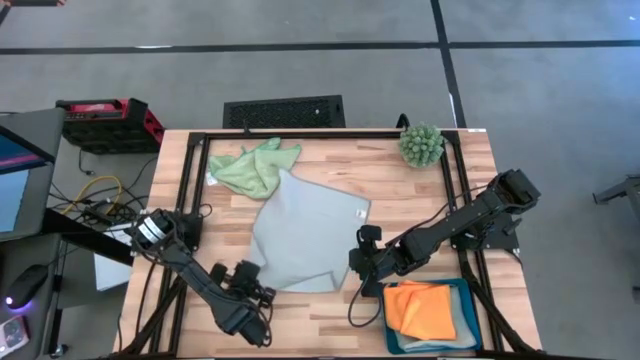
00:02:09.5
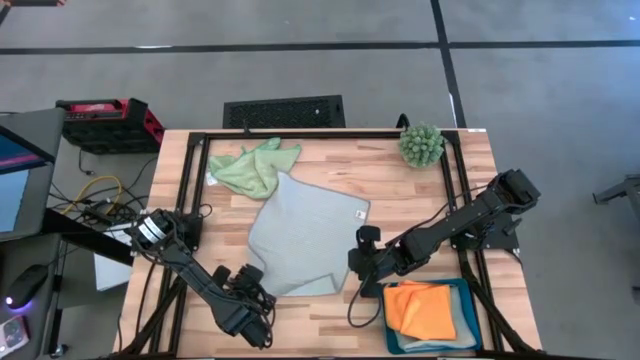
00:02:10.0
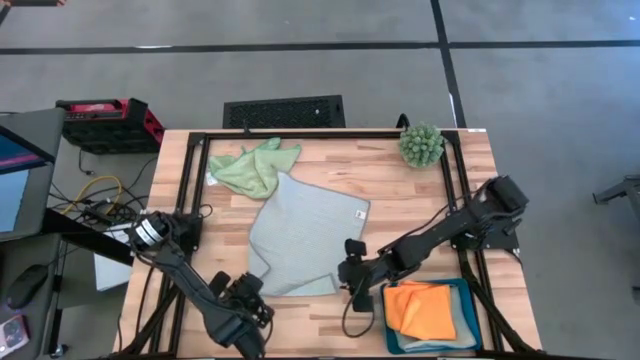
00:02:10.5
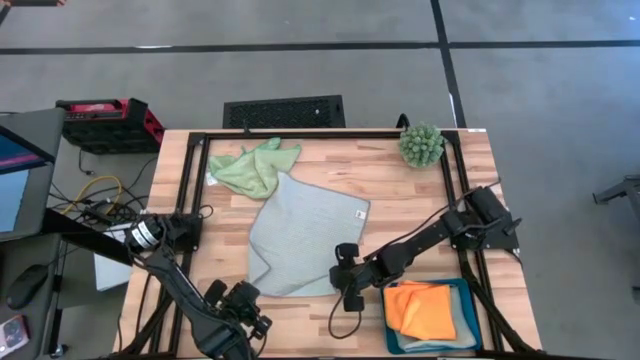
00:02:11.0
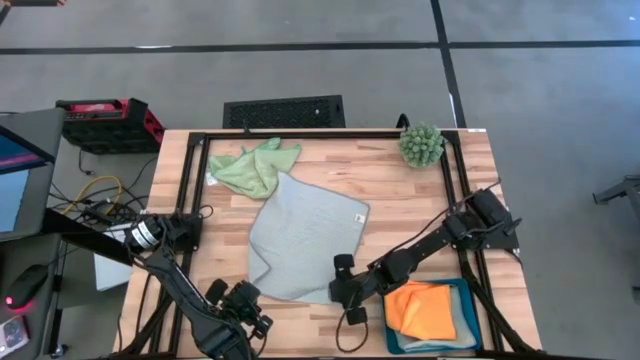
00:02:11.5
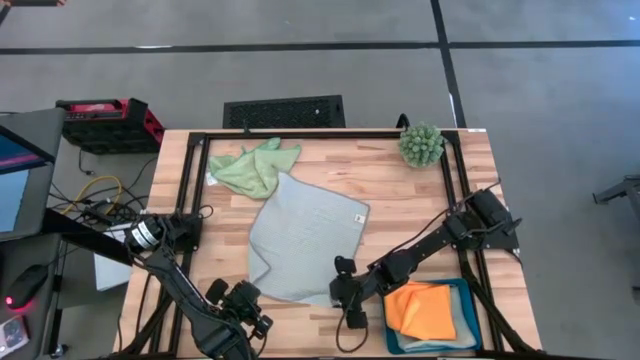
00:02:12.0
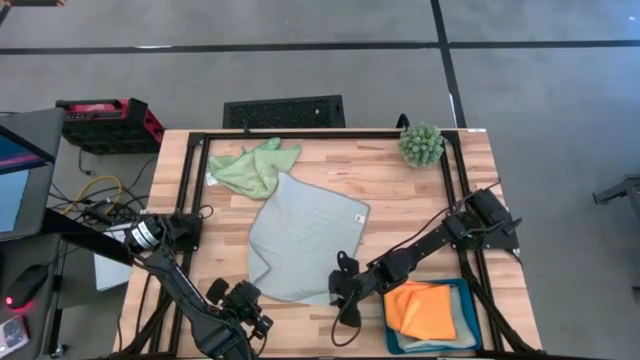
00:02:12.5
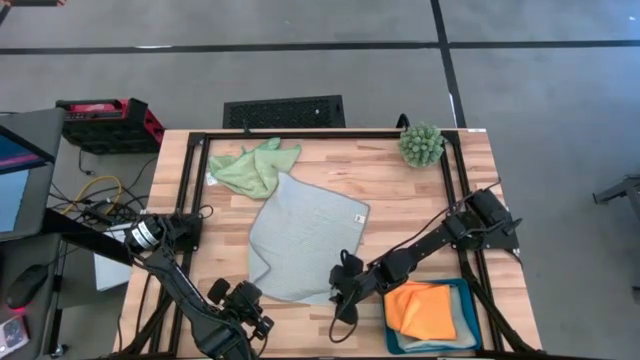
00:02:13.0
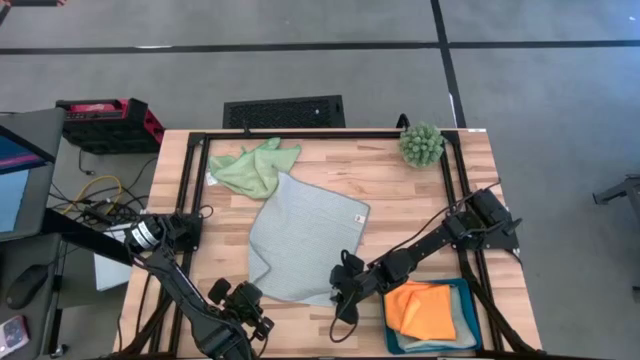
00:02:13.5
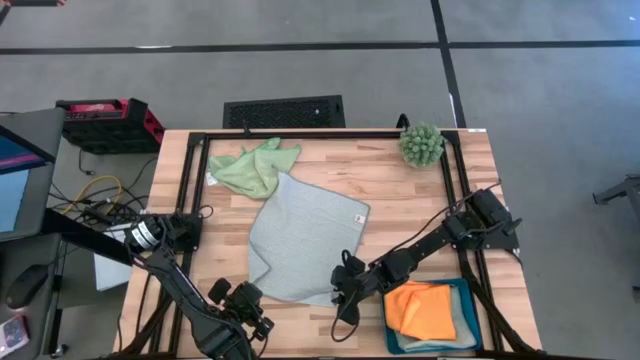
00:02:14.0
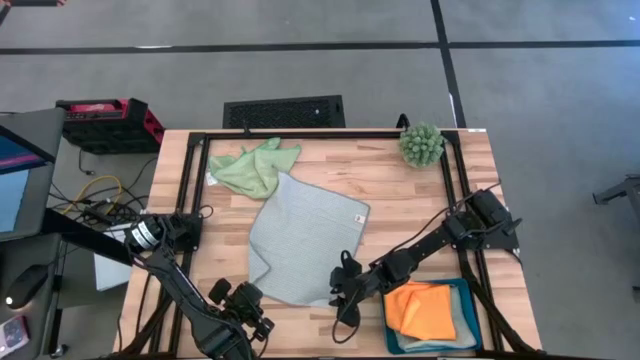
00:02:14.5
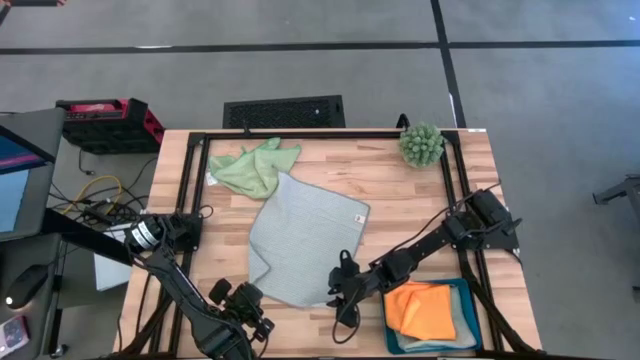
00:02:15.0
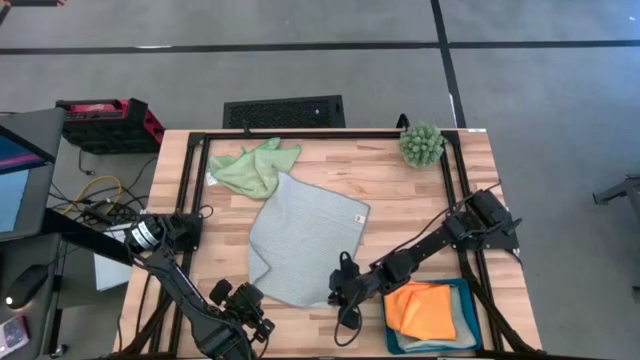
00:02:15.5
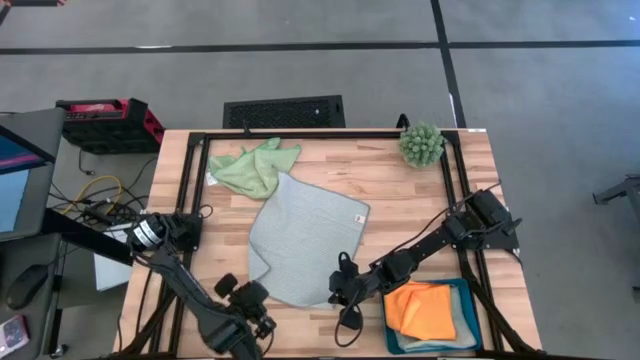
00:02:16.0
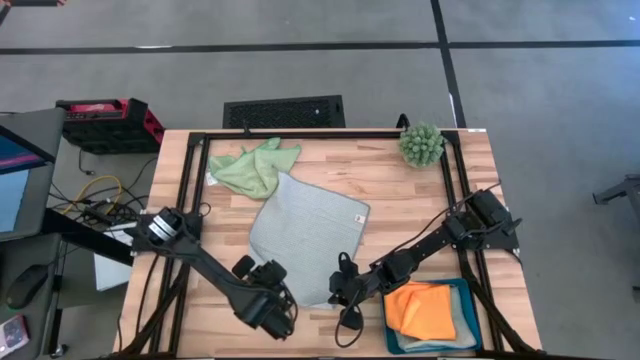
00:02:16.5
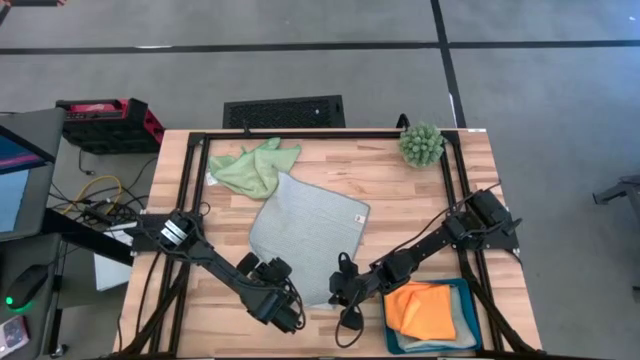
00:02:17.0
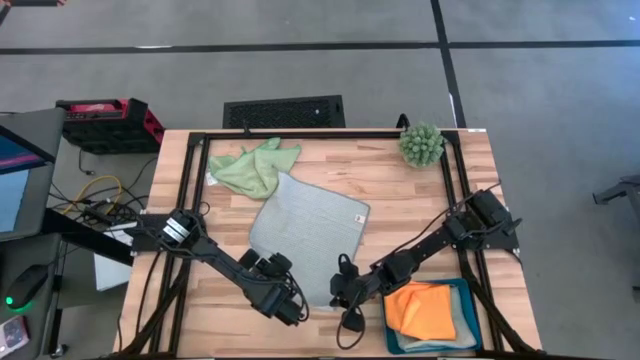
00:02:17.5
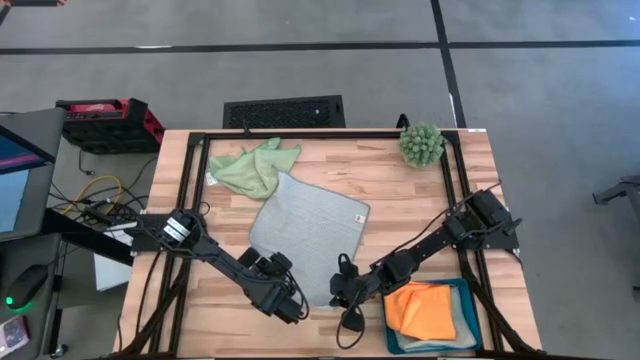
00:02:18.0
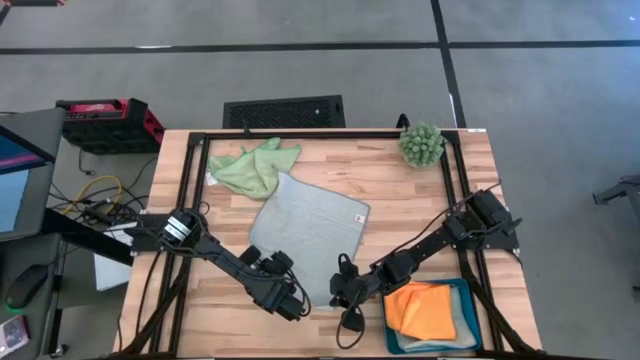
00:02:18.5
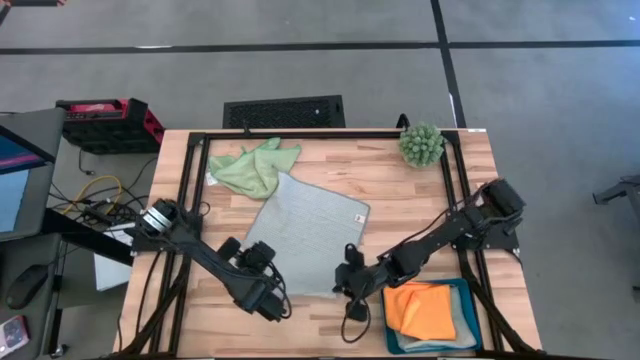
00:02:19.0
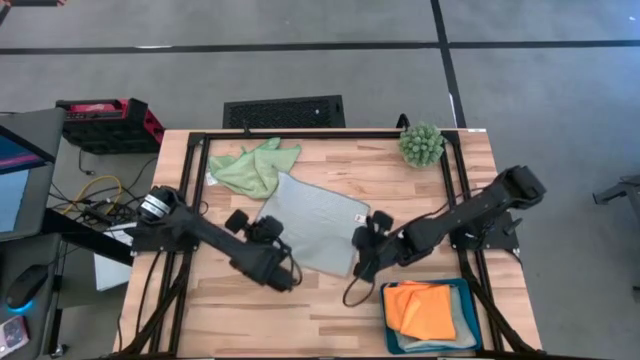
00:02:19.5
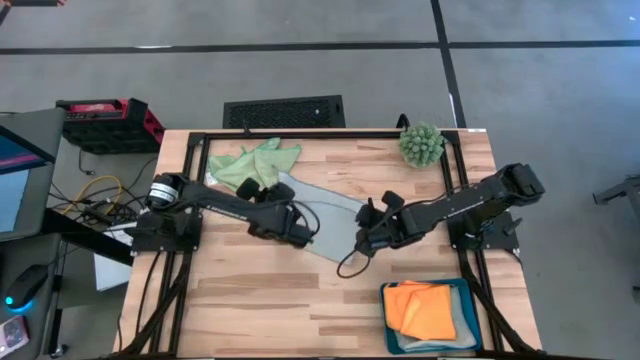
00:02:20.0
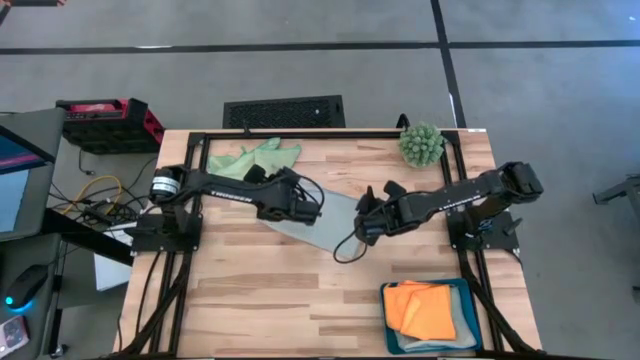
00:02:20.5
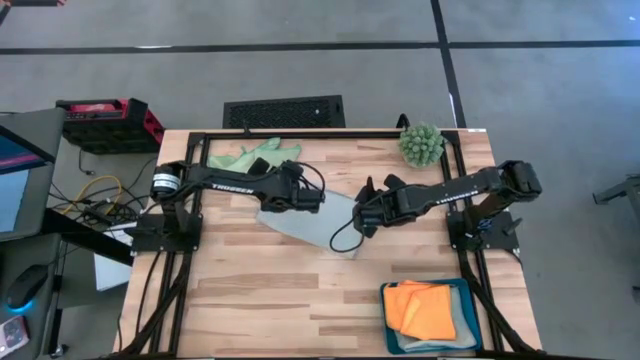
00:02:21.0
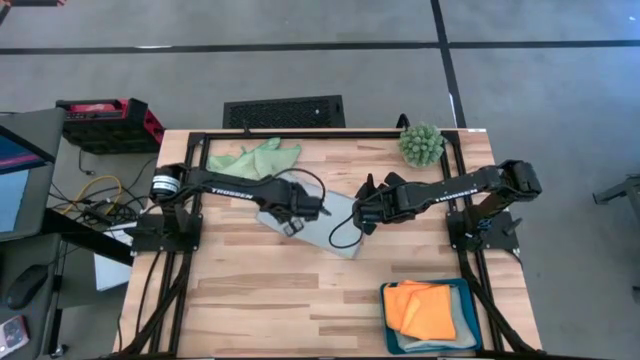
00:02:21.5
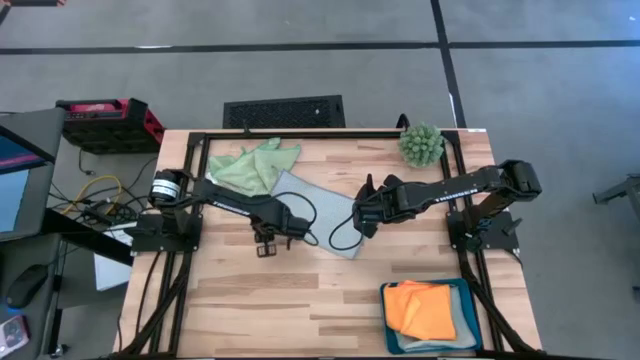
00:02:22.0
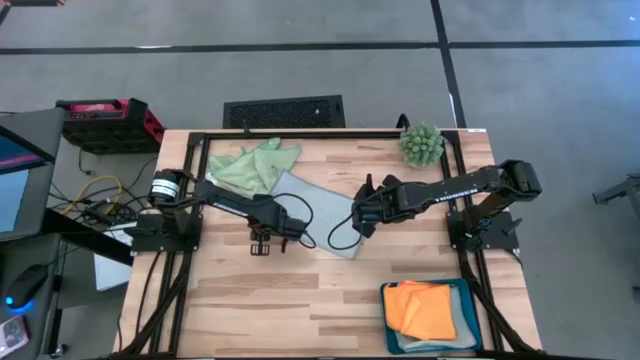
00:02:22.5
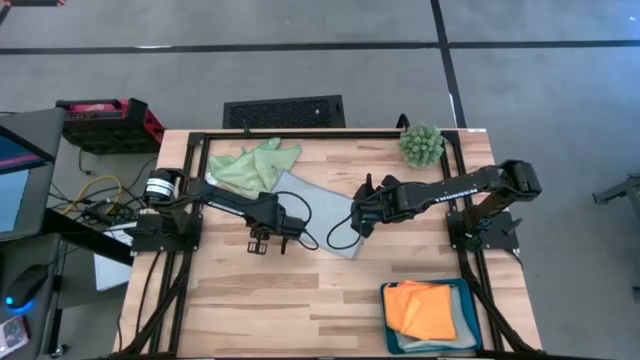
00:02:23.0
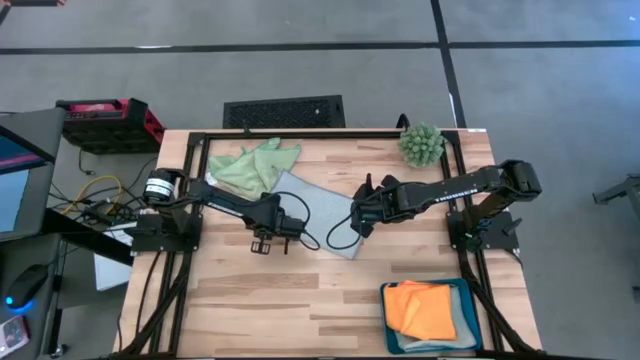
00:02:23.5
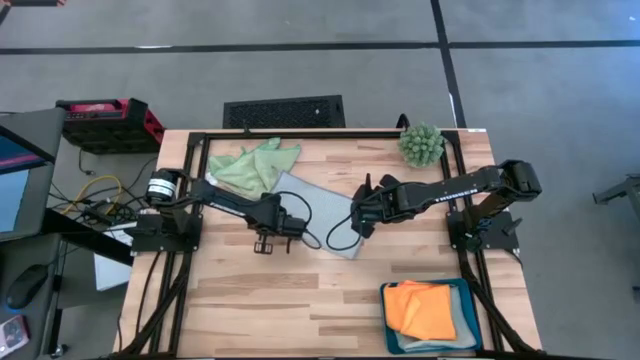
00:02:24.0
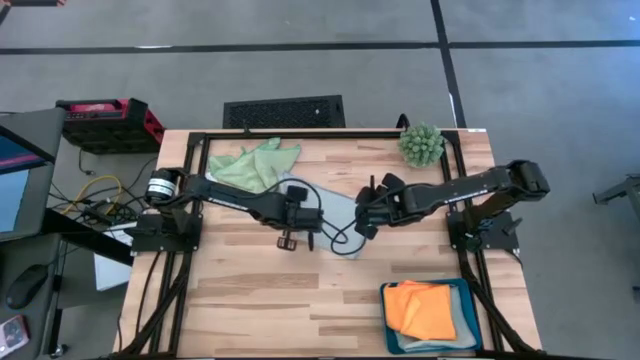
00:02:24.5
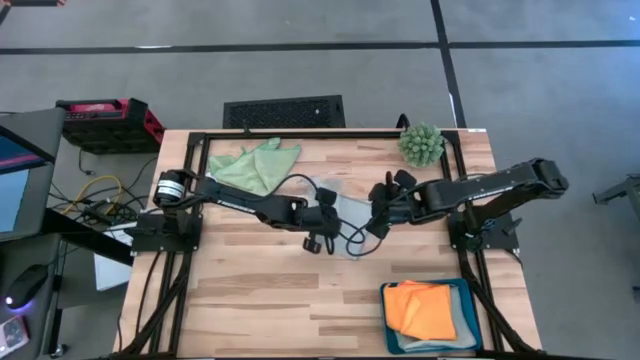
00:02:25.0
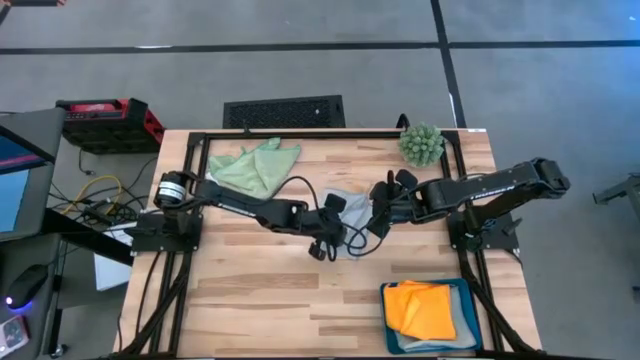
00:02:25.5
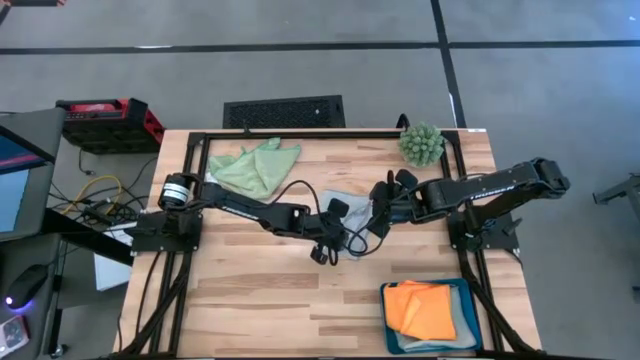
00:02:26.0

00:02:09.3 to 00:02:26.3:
Task: Fold microfiber towels
Fold the gray towel

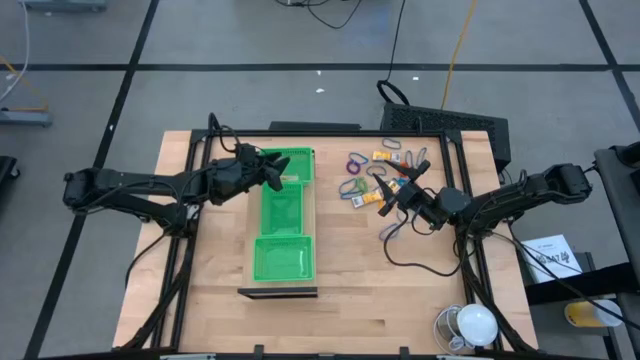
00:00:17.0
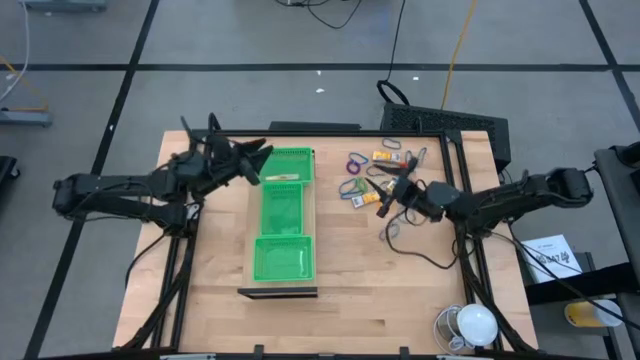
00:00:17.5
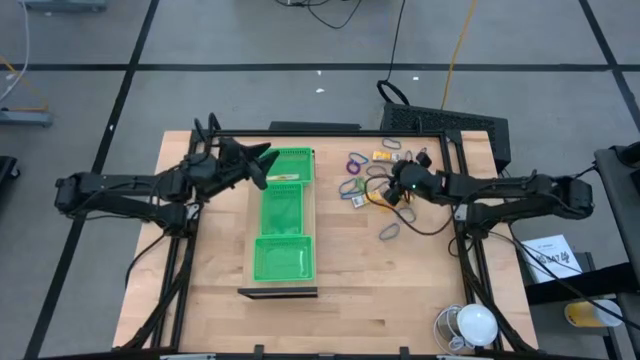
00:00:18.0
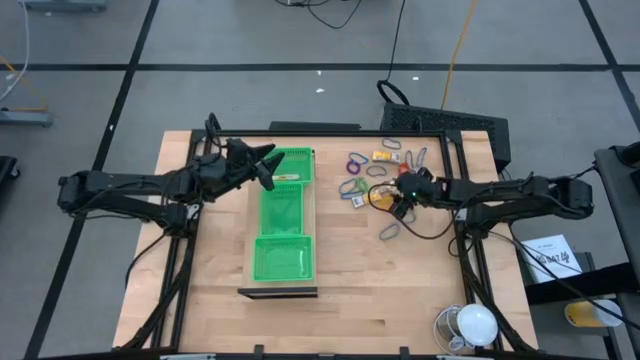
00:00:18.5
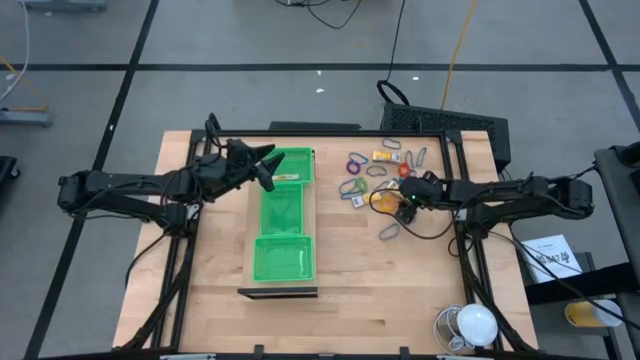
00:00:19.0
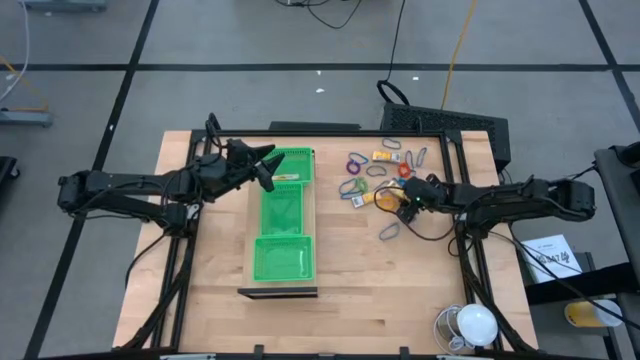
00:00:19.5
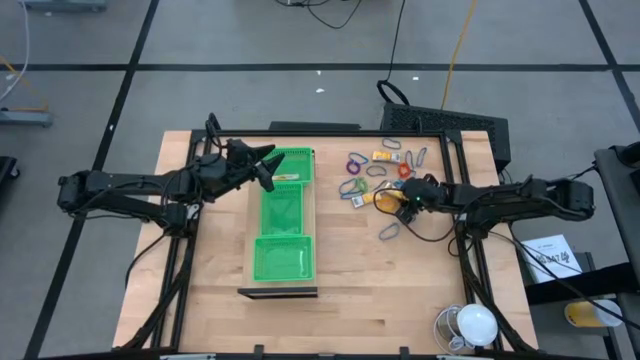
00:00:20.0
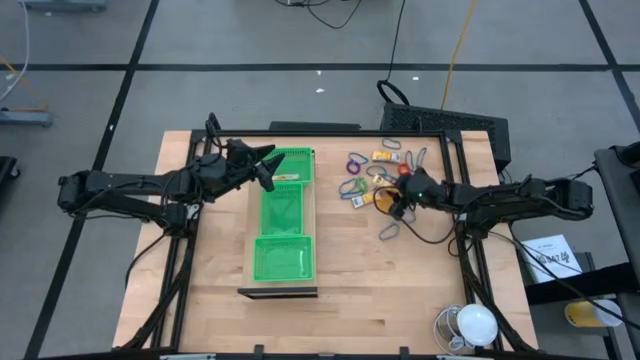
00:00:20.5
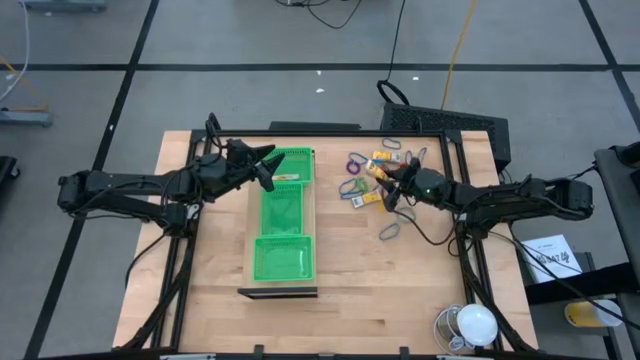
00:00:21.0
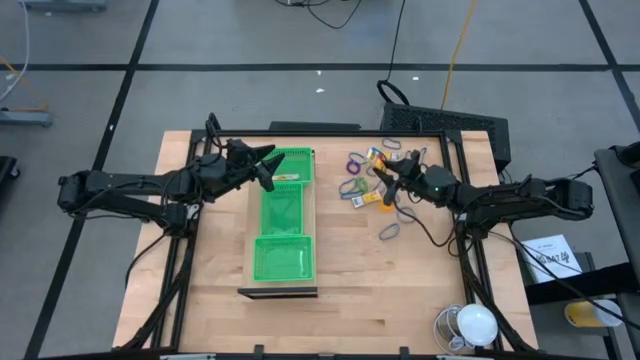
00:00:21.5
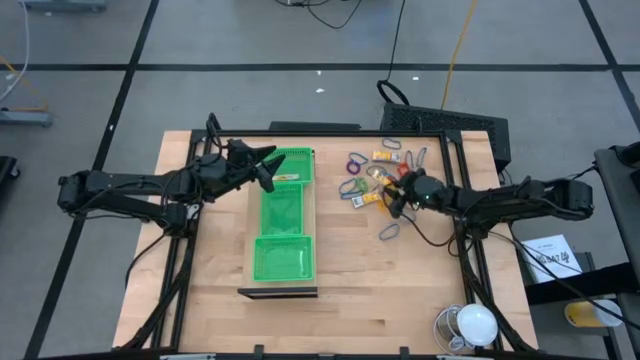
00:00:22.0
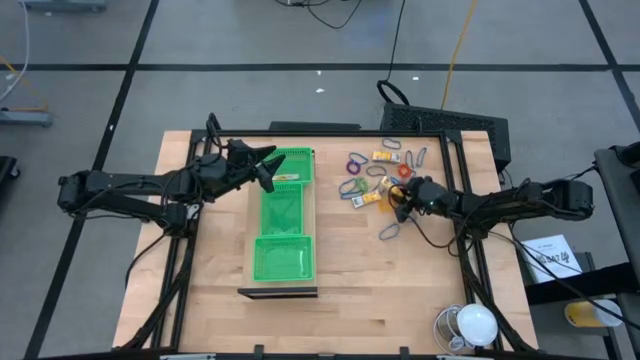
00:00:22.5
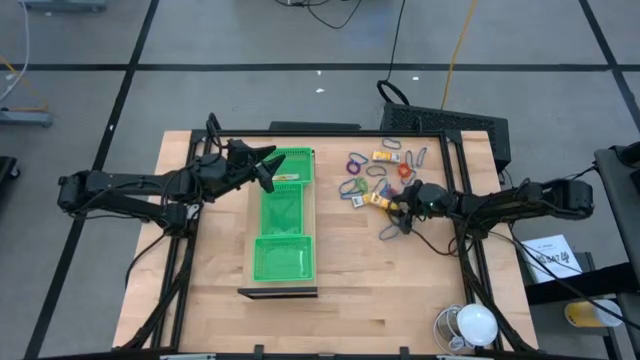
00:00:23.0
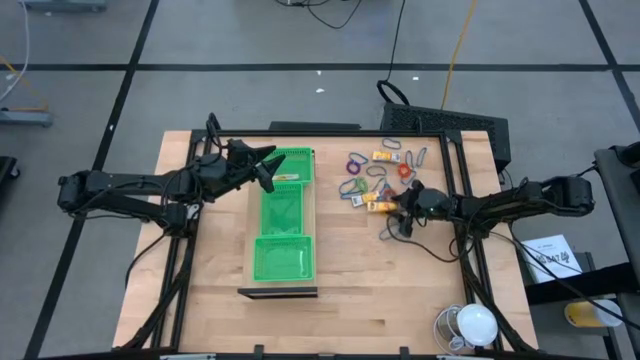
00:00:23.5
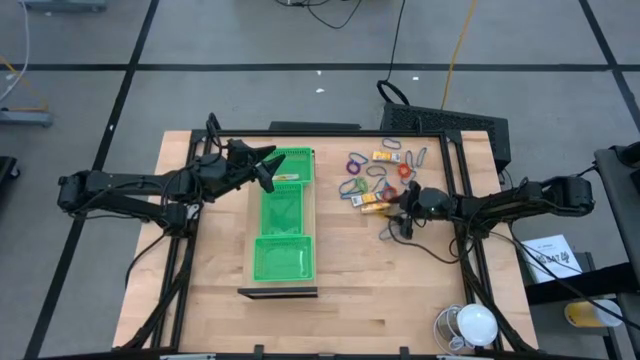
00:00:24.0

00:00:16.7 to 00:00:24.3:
Task: Pick & Place Office Desk Supplies
Put the yellow crayon box into the top green bin on the shelf
